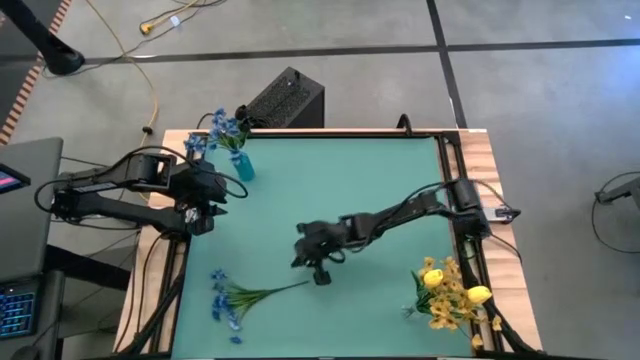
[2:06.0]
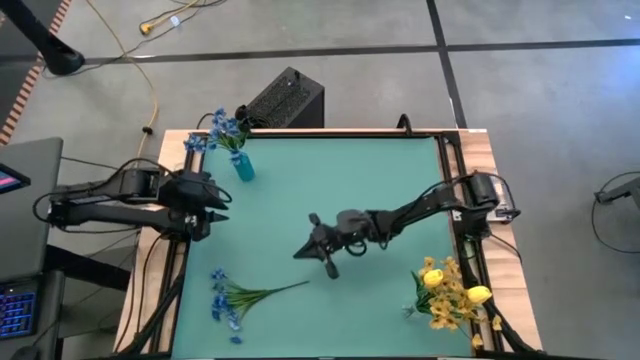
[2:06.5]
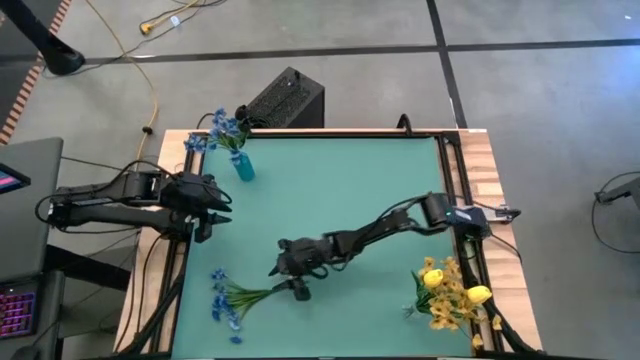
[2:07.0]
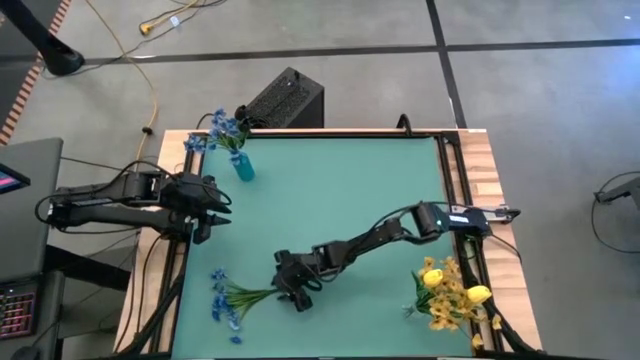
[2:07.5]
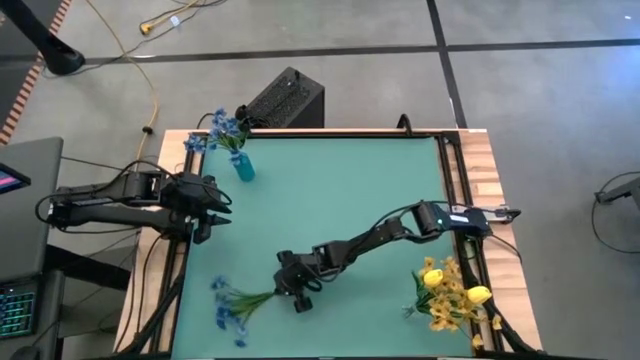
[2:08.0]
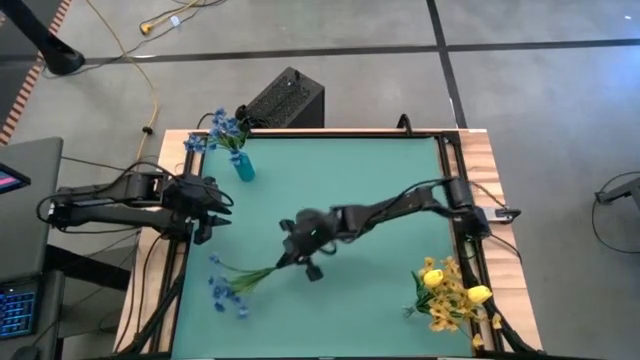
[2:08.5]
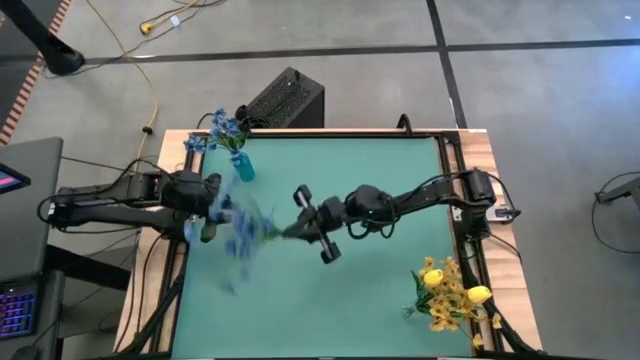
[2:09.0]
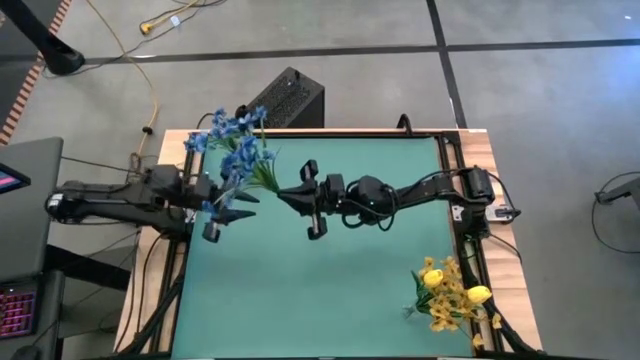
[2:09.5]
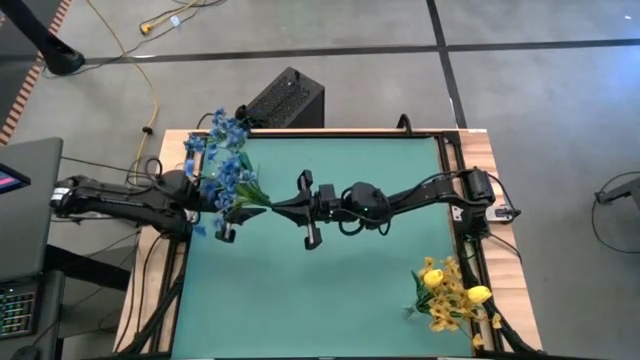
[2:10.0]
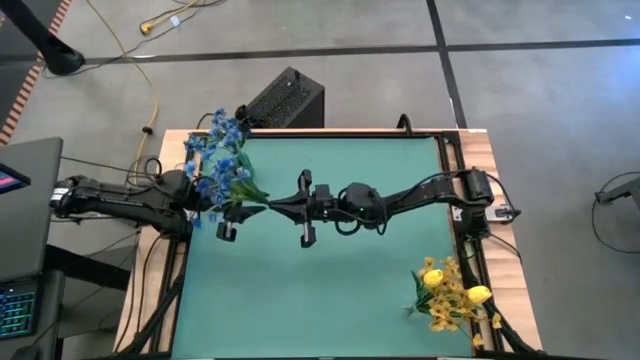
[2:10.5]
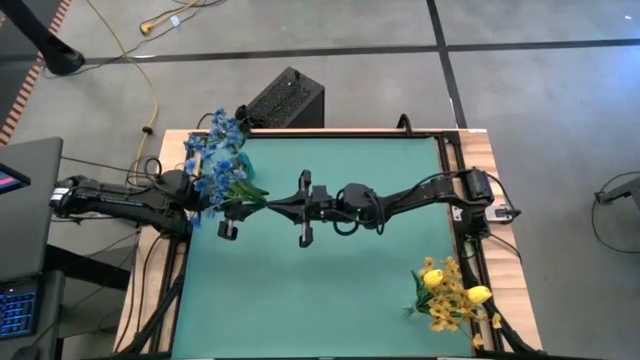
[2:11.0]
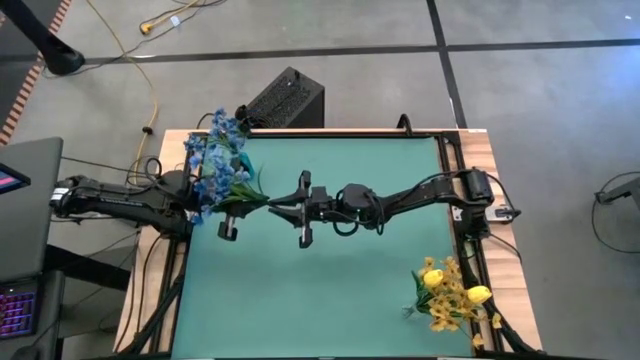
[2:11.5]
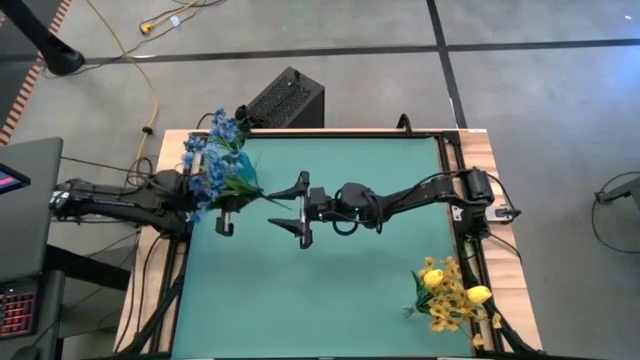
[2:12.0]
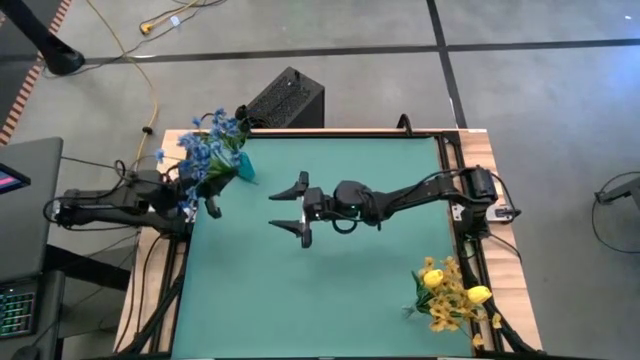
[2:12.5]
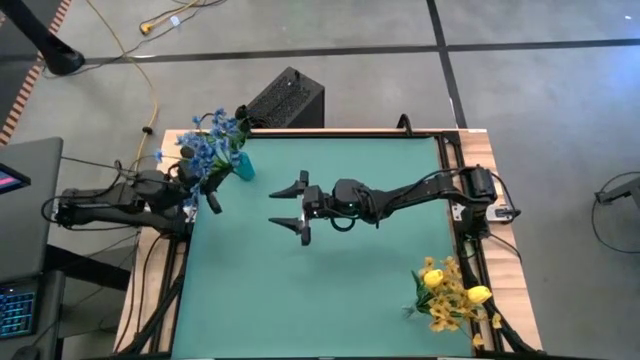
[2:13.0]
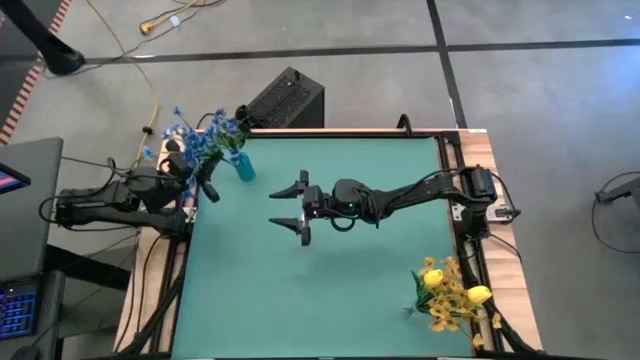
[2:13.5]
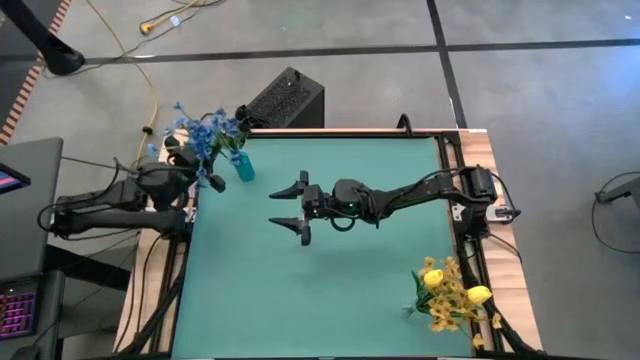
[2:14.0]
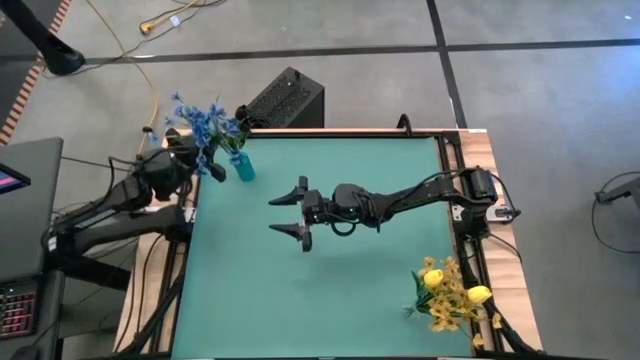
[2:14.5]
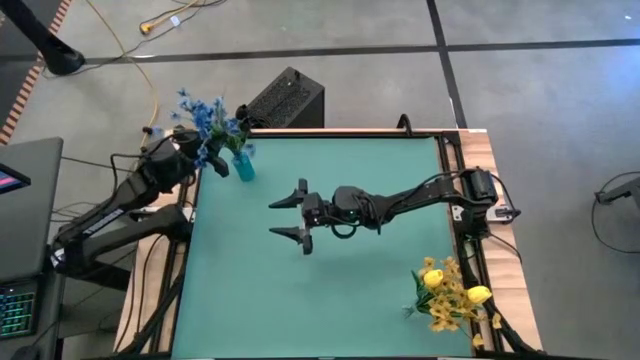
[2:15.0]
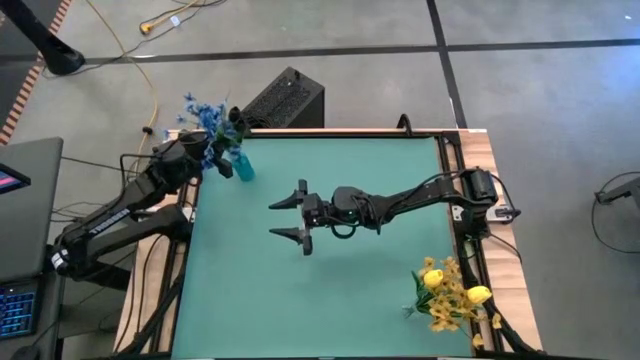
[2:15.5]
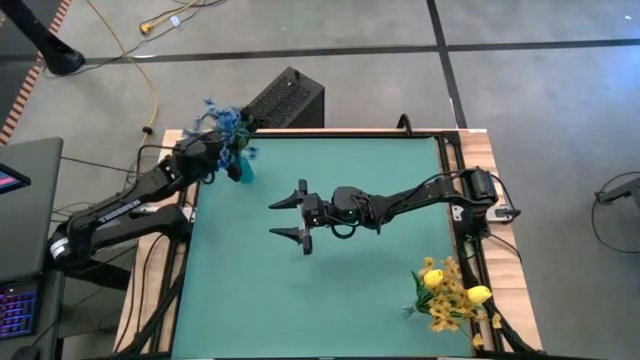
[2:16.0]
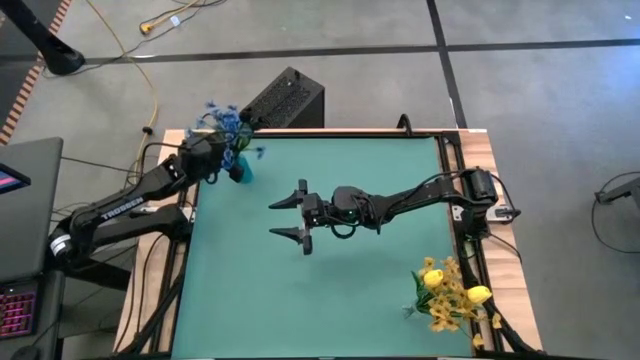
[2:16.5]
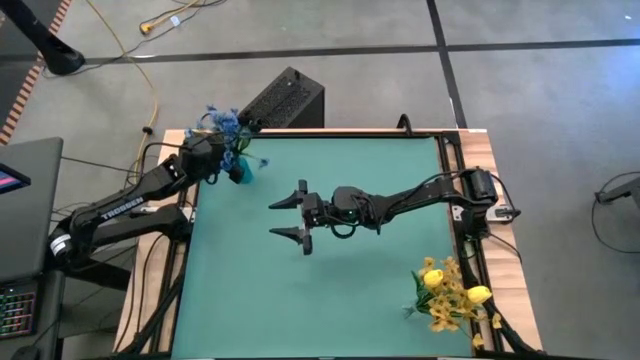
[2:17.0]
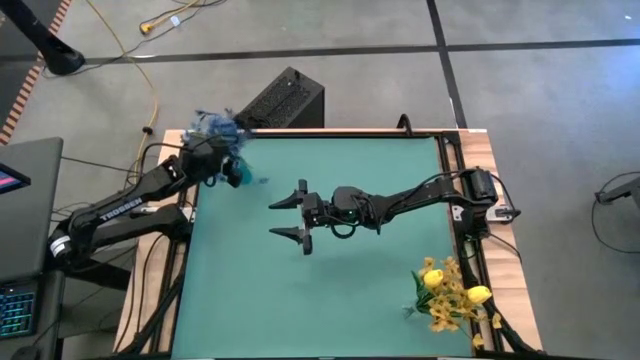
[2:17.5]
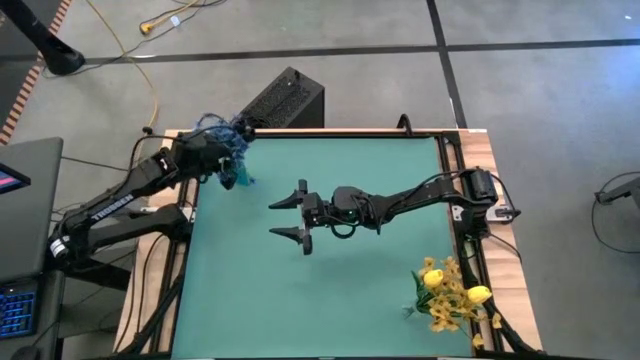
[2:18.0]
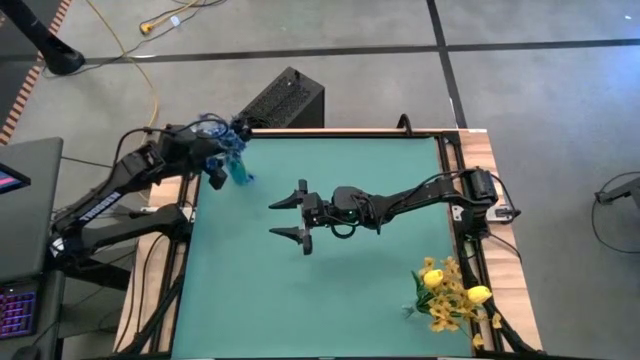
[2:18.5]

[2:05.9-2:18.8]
Task: Sort flowers into vase by color
Put the blue flower into the blue vase

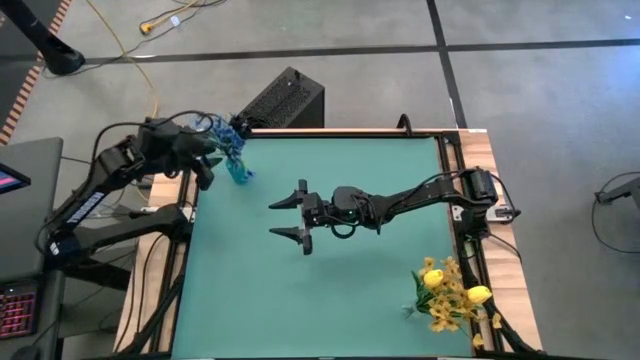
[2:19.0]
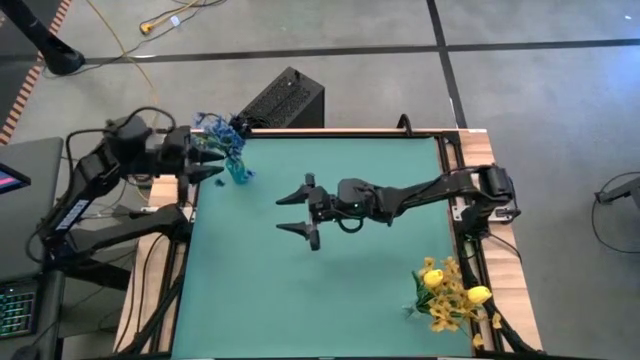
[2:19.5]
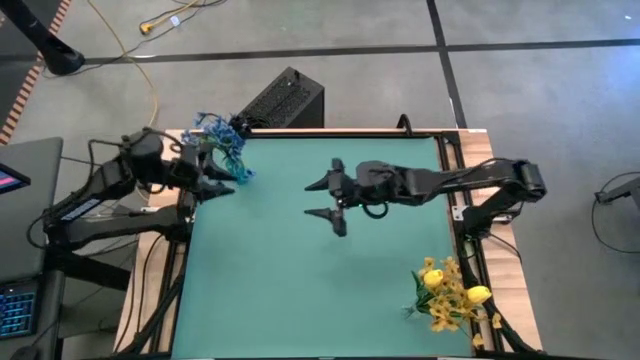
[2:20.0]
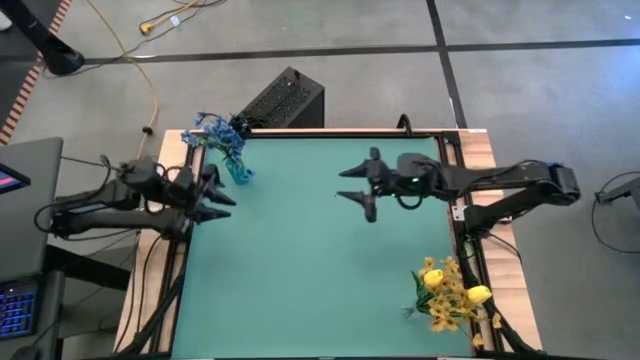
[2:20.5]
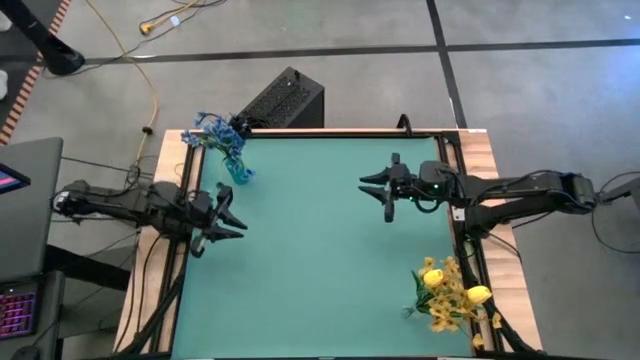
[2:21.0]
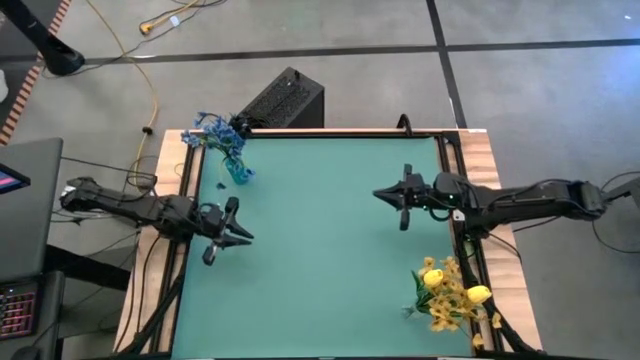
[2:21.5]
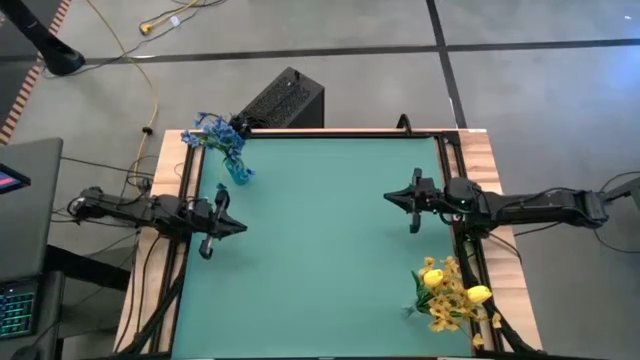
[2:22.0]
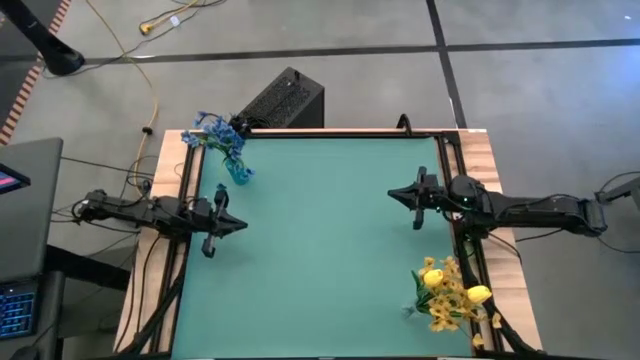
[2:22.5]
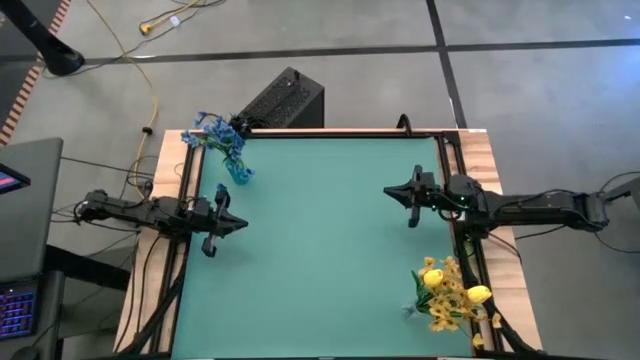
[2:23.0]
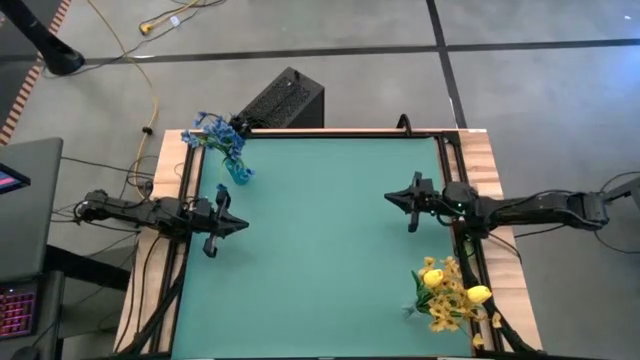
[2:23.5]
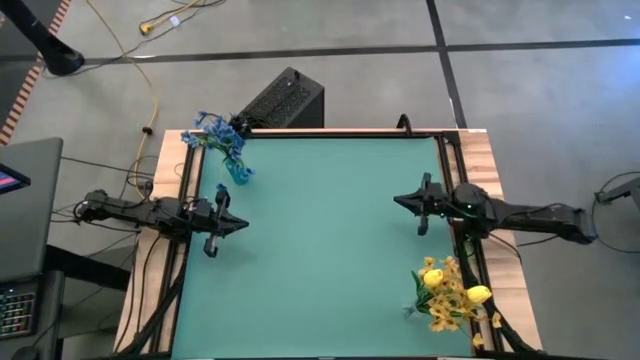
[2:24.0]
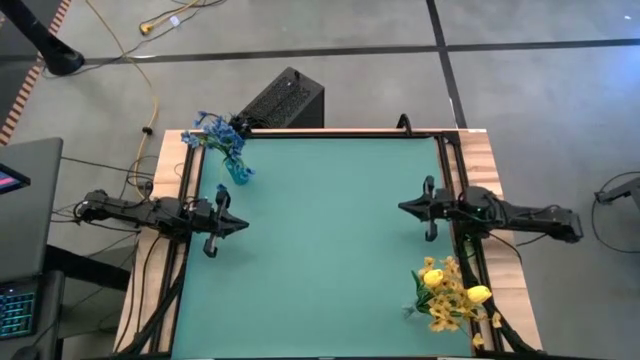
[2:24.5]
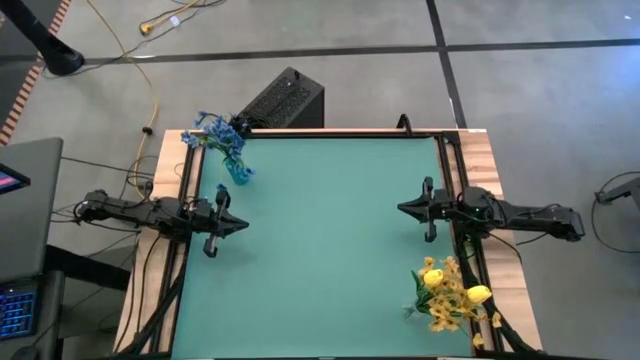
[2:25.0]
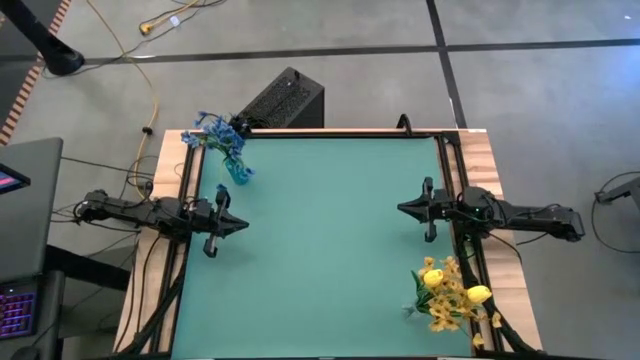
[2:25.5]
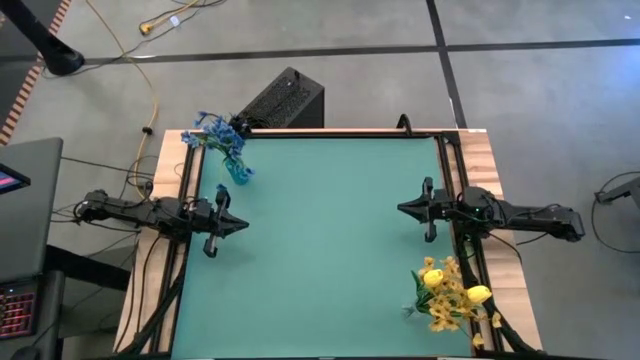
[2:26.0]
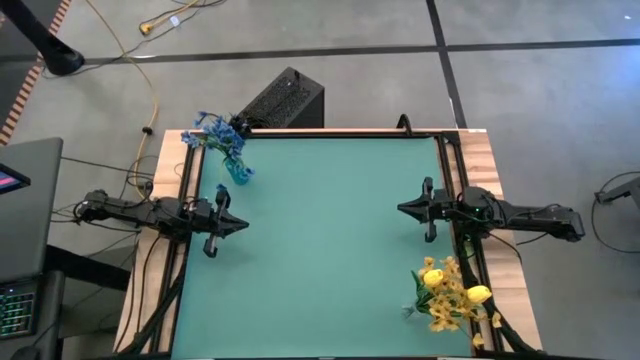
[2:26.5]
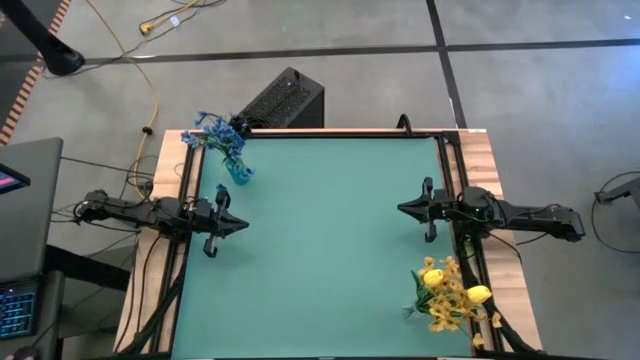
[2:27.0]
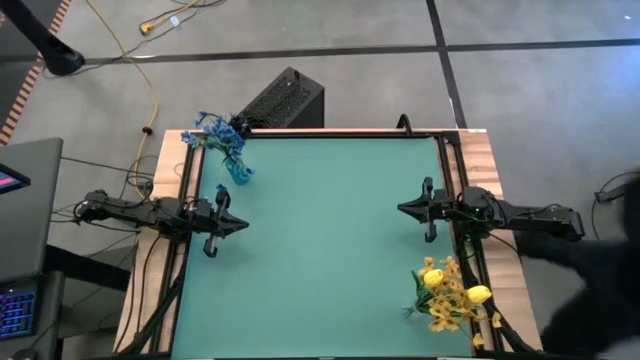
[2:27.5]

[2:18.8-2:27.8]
Return to Home Position
